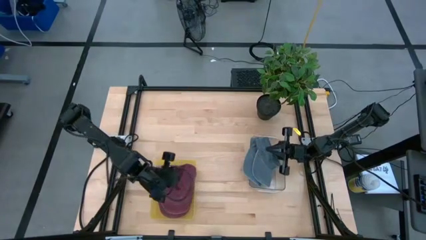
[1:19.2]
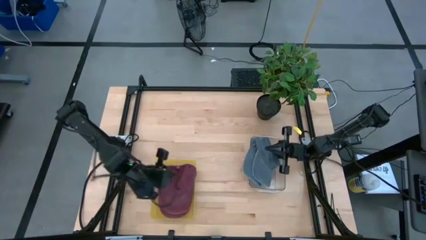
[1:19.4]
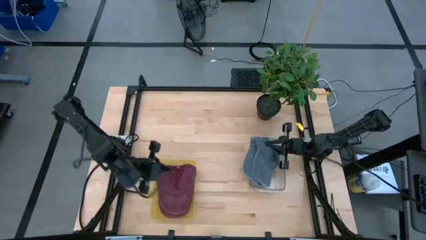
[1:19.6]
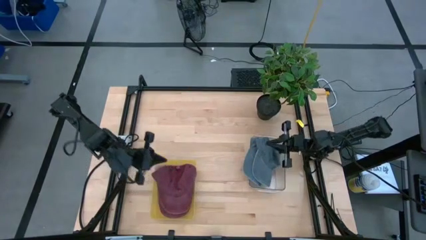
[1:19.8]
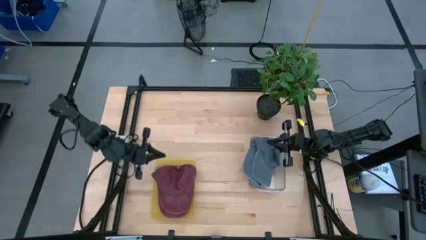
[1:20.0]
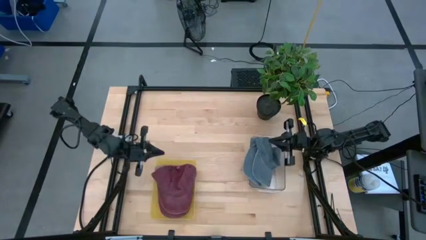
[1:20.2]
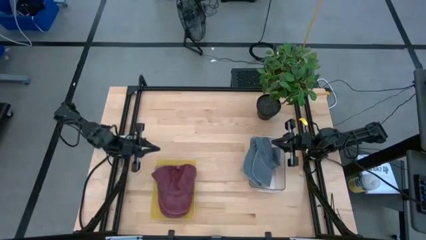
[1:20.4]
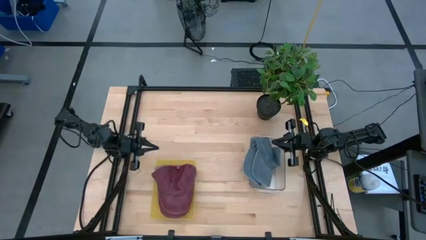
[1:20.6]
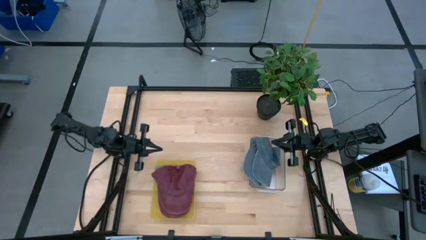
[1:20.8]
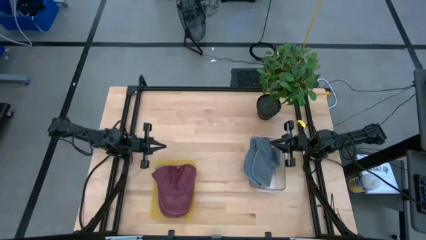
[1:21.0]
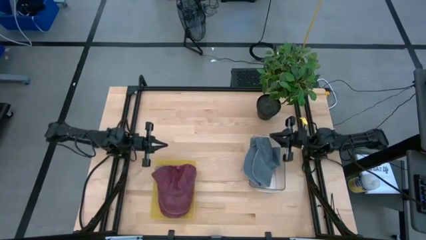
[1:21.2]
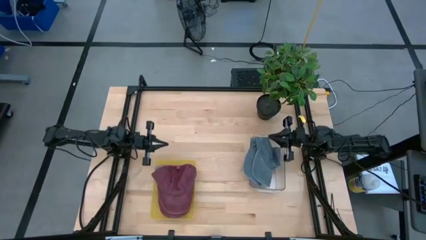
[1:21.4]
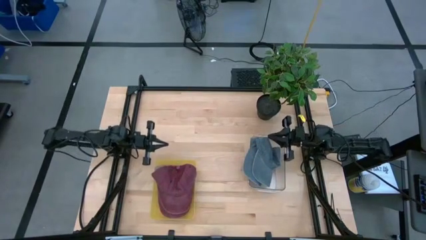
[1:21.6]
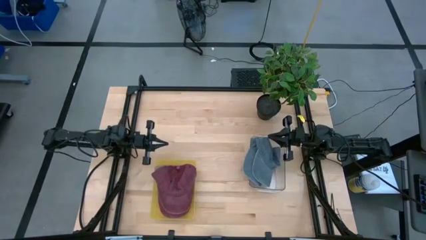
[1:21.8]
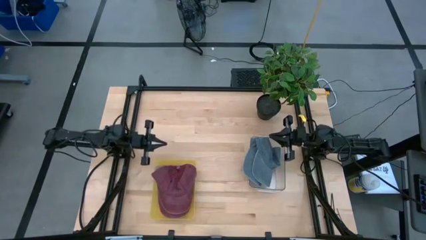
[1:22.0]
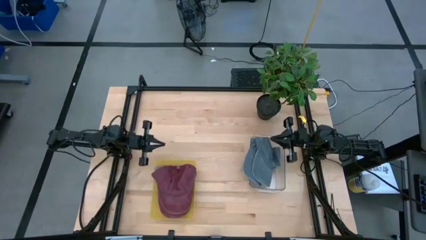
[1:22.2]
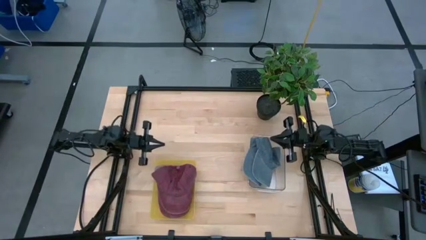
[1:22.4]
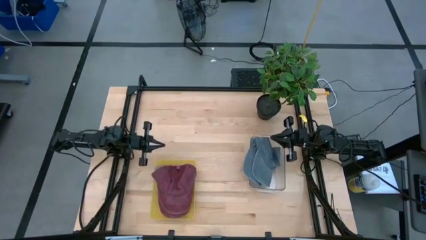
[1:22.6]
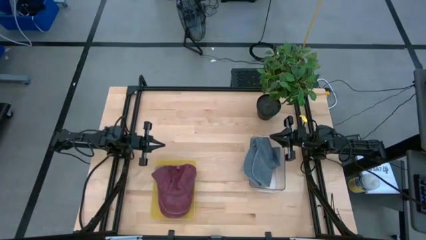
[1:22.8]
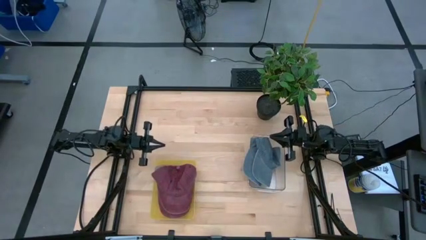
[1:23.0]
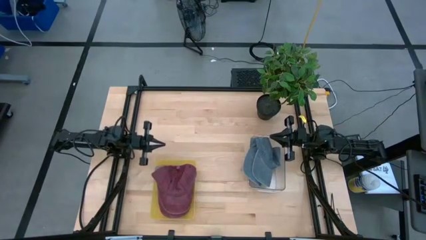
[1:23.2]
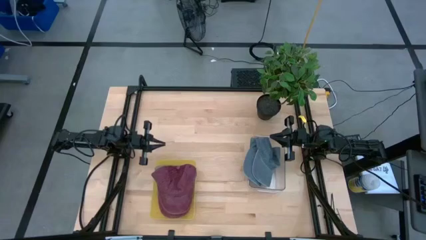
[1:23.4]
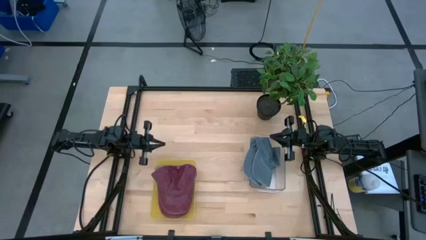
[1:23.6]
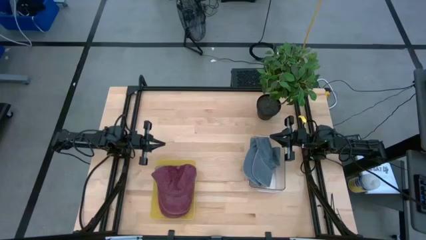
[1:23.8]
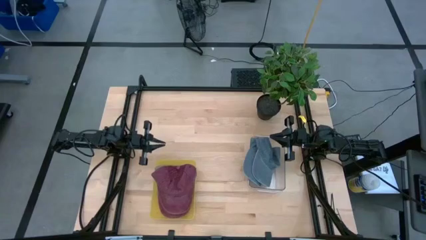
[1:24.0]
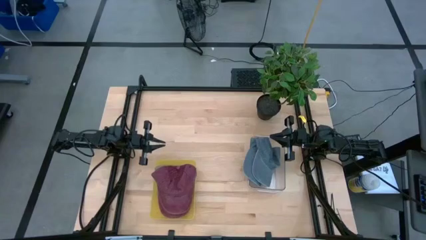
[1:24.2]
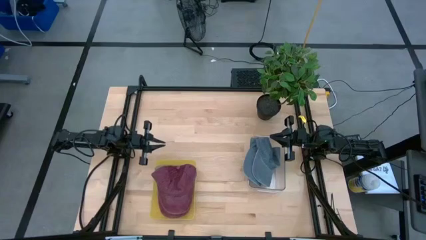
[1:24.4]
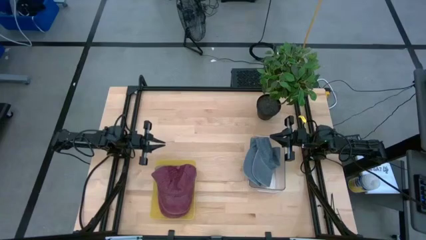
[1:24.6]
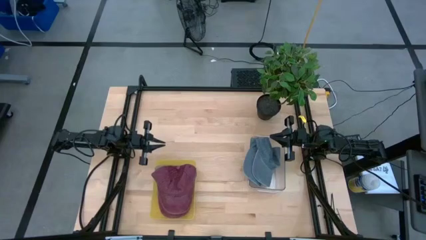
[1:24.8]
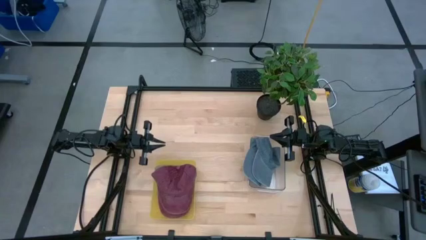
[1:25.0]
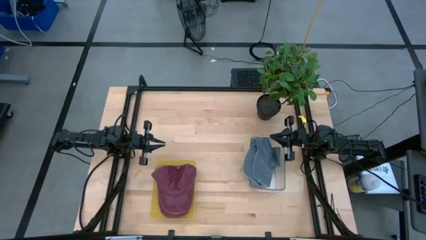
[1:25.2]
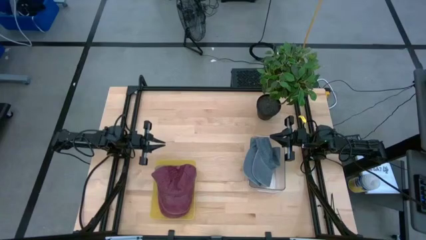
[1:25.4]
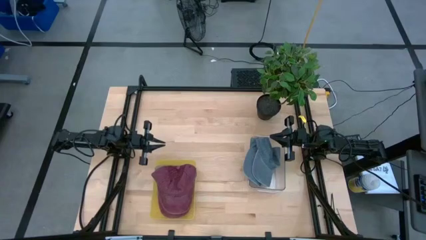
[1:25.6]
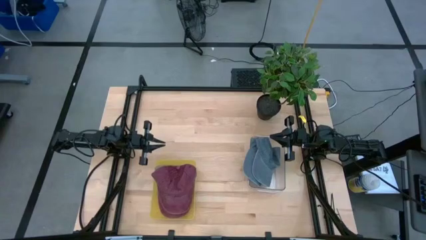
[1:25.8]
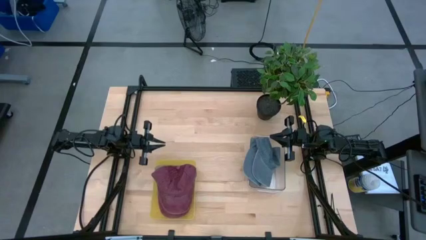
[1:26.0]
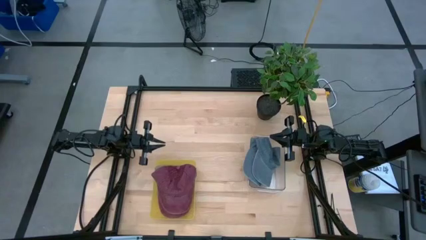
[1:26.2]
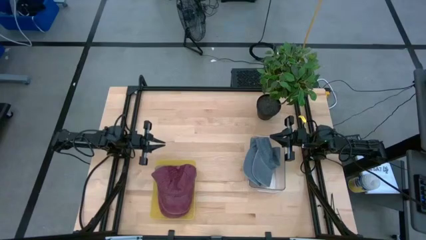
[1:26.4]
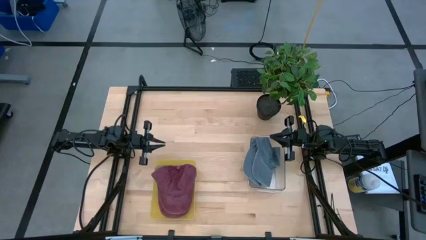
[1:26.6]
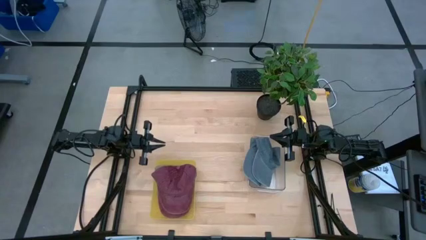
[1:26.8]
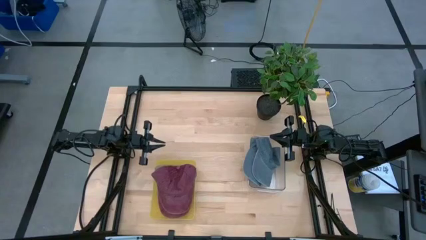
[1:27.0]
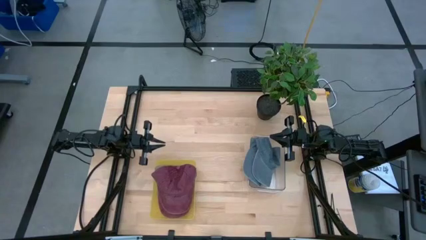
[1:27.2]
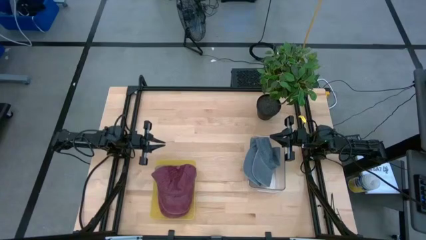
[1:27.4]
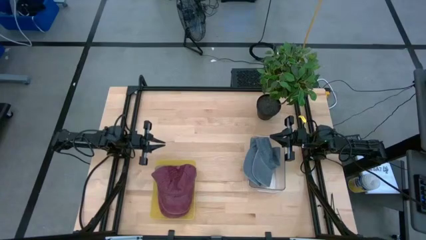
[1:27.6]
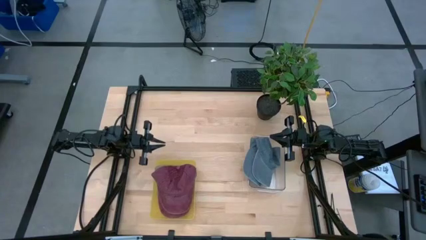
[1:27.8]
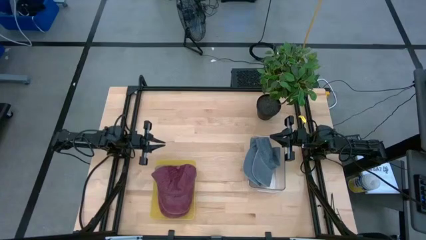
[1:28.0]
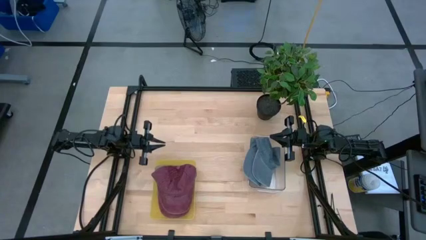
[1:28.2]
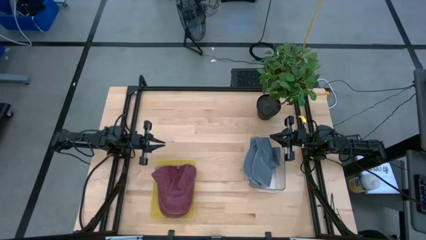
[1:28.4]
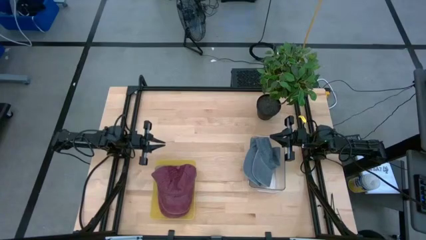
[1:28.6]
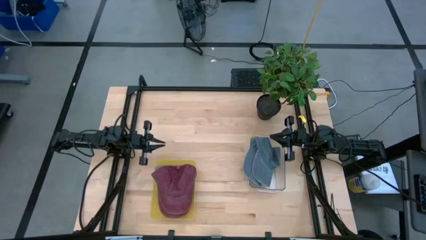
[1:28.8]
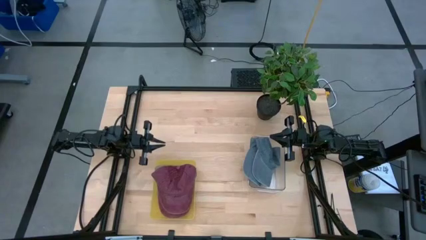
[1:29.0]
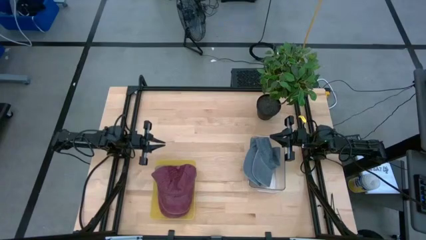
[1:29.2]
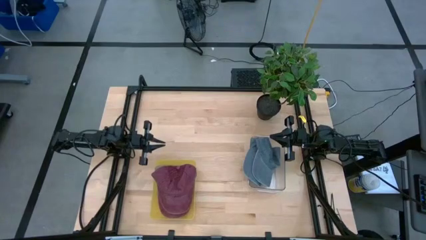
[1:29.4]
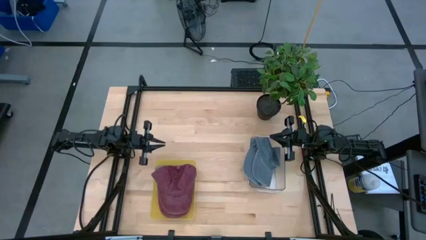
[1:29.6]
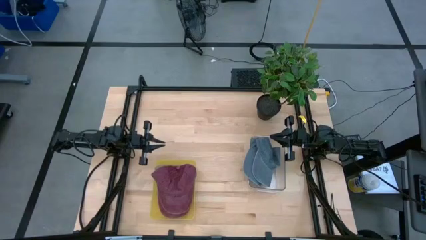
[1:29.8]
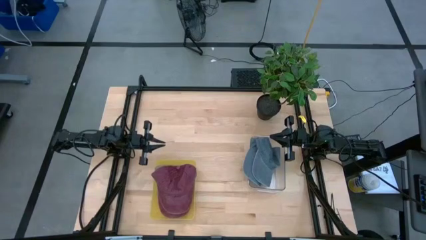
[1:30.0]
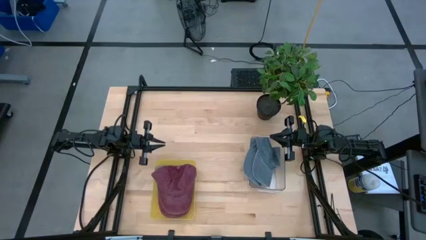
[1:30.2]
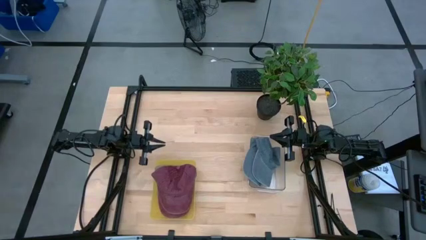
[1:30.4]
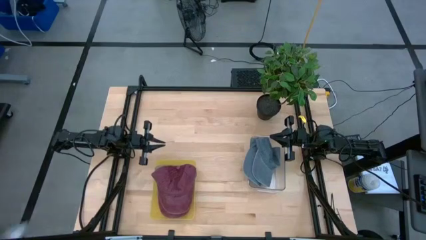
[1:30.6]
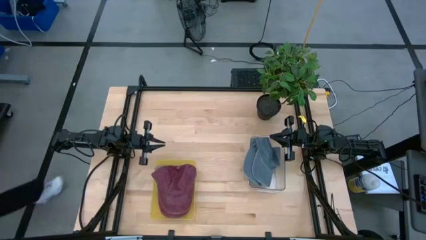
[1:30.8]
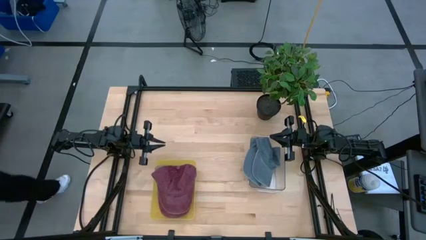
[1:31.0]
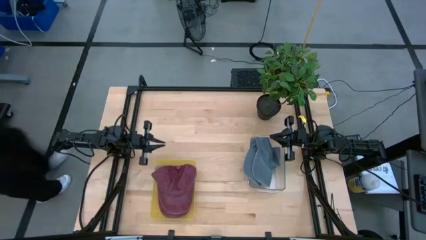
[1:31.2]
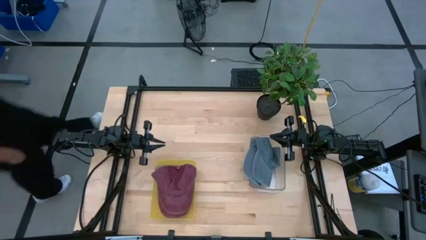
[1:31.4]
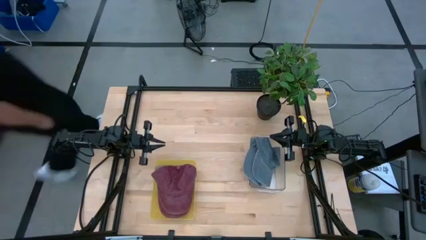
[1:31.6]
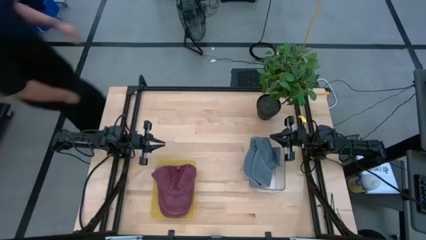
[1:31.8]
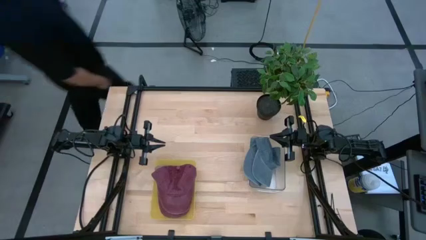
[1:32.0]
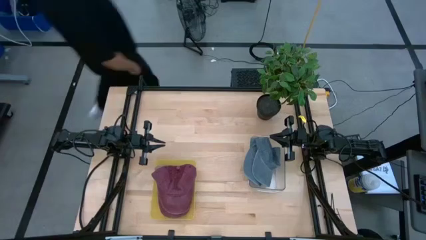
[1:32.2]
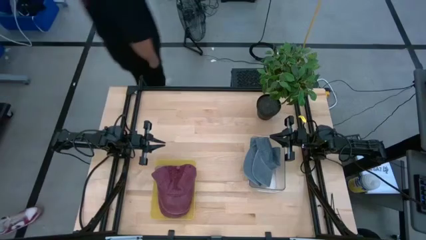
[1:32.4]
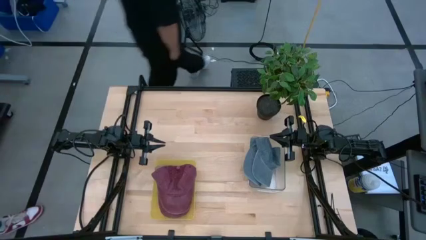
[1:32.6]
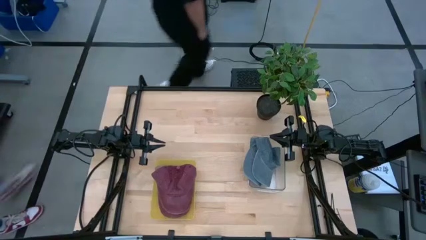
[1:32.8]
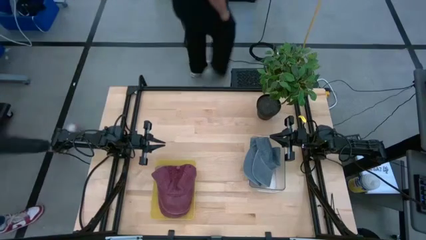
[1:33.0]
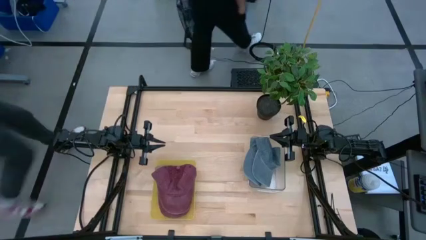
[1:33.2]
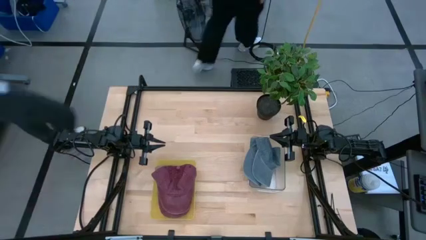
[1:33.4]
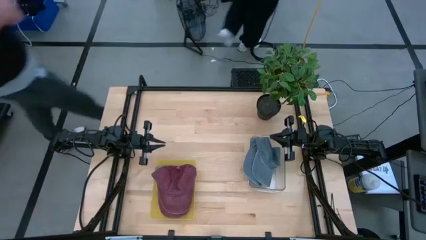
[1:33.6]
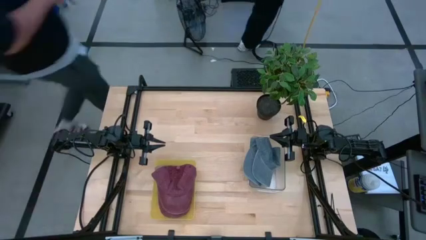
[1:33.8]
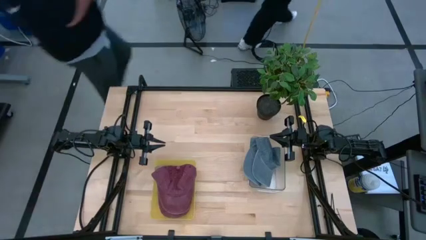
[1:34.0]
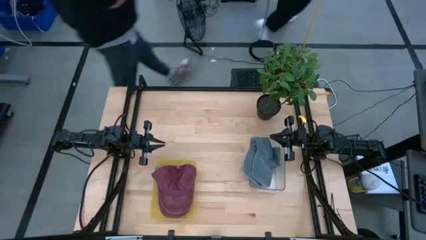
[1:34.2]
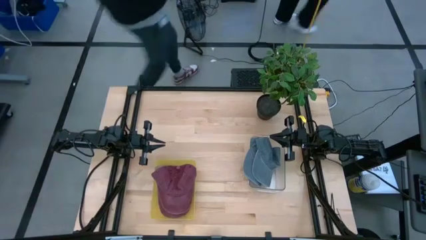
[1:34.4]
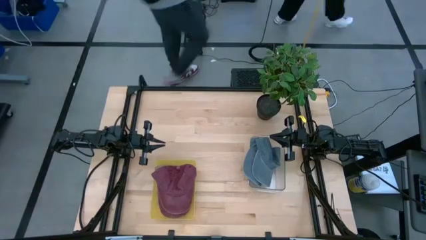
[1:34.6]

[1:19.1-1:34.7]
Task: Pick & Place hat
Return to Home Position
